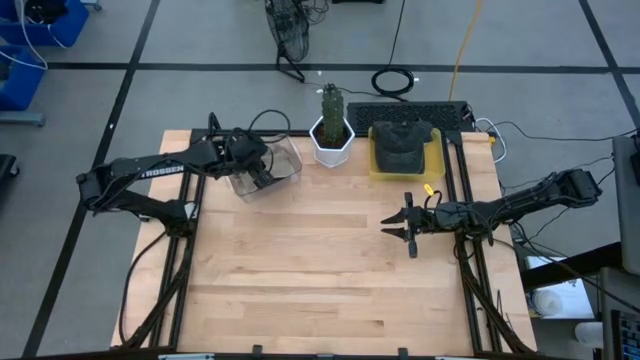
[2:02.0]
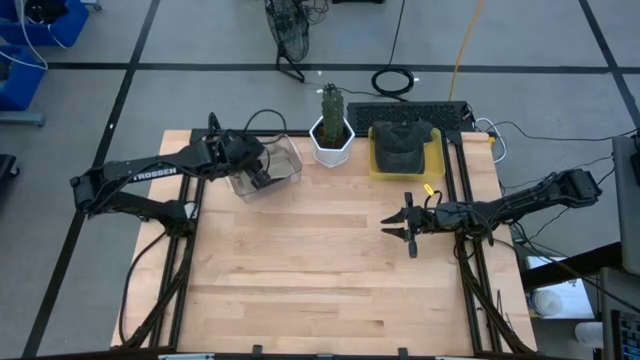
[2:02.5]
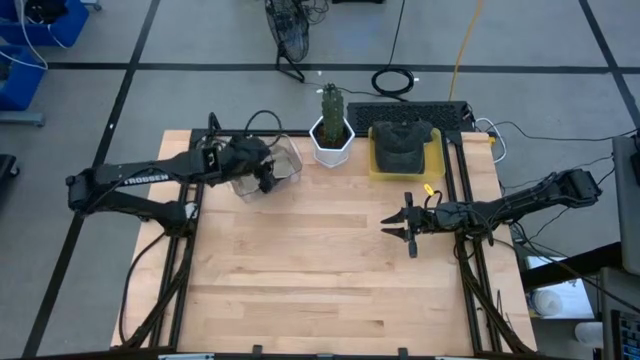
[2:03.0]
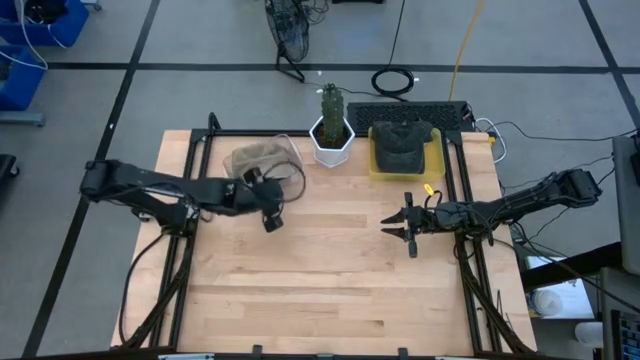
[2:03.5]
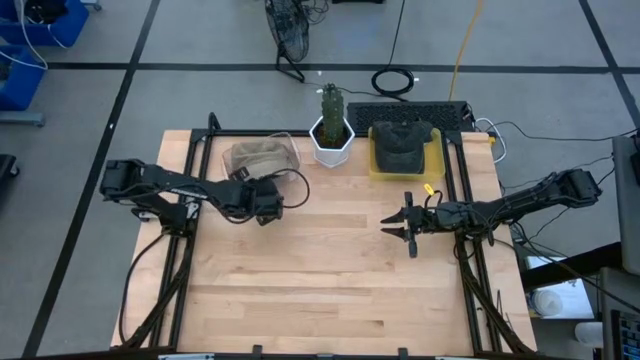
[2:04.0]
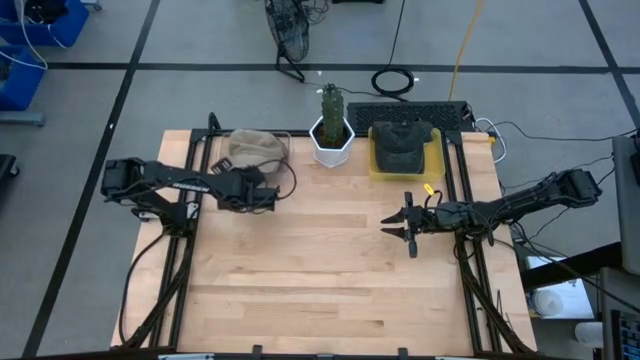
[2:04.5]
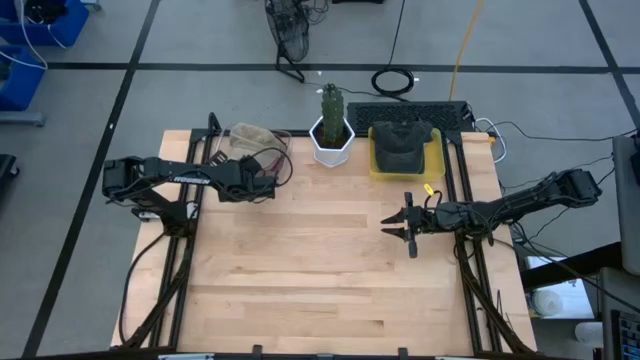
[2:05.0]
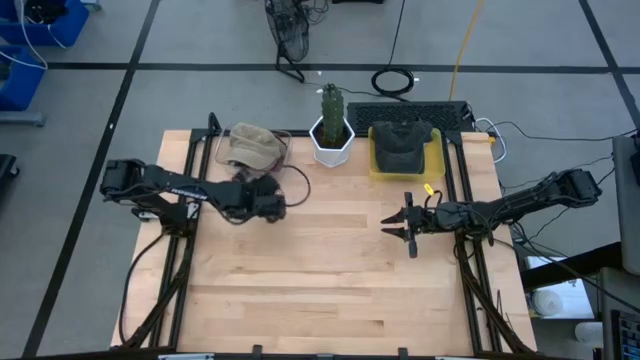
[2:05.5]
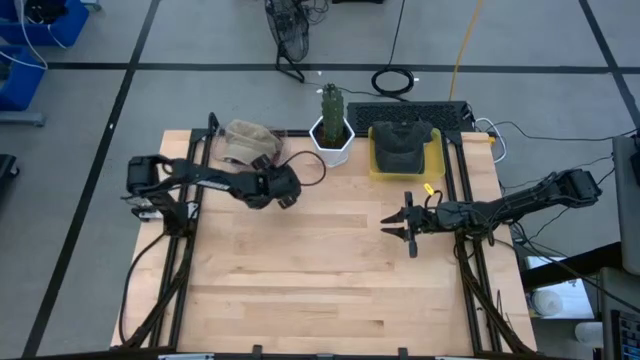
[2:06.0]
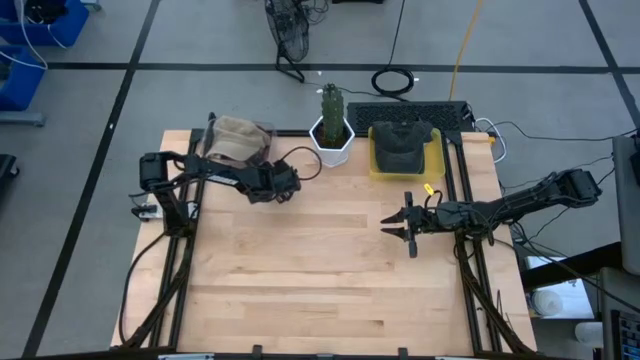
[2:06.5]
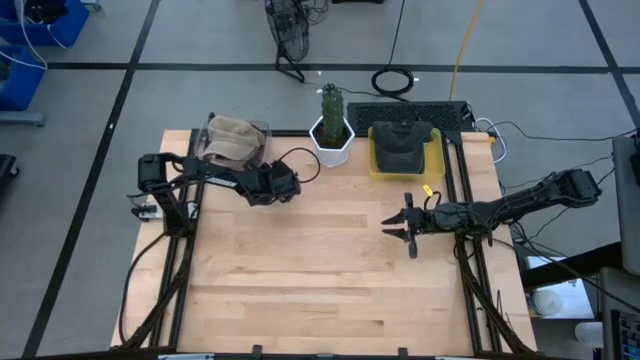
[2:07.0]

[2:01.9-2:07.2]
Task: Pick & Place hat
Adjust the transparent bin

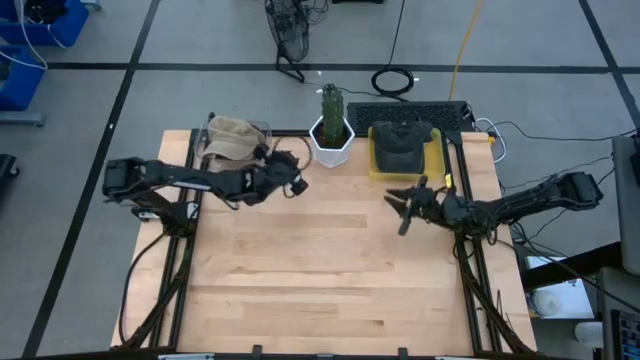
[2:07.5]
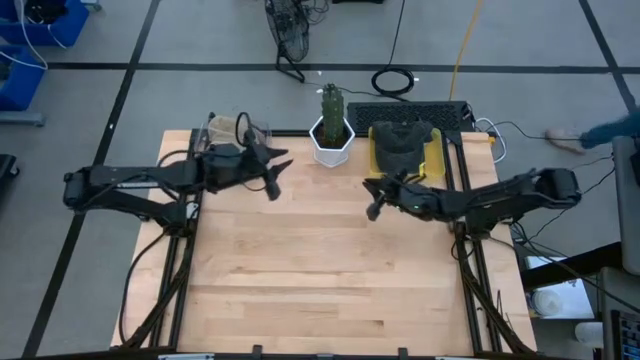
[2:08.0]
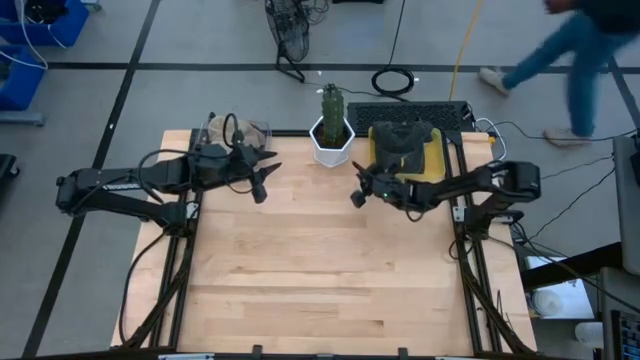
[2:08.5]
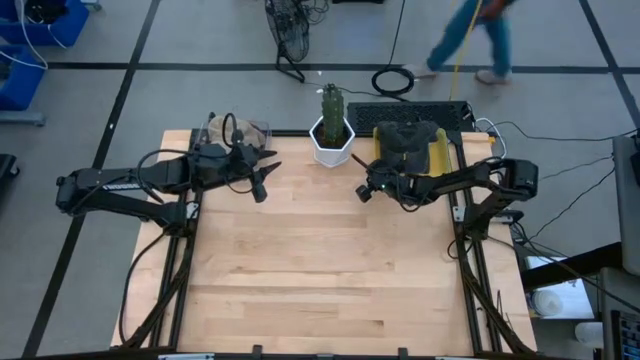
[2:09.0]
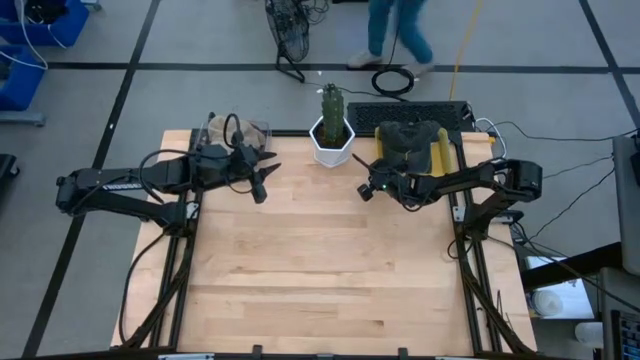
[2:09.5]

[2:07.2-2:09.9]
Adjust the yellow bin

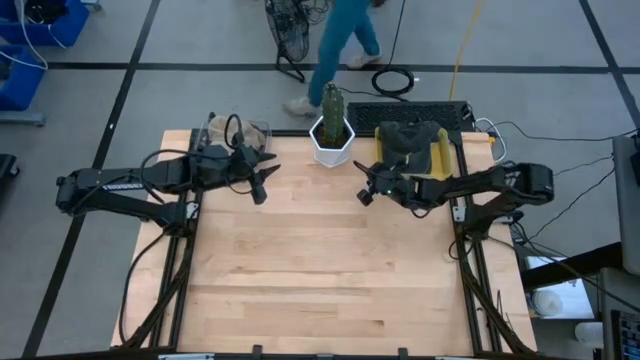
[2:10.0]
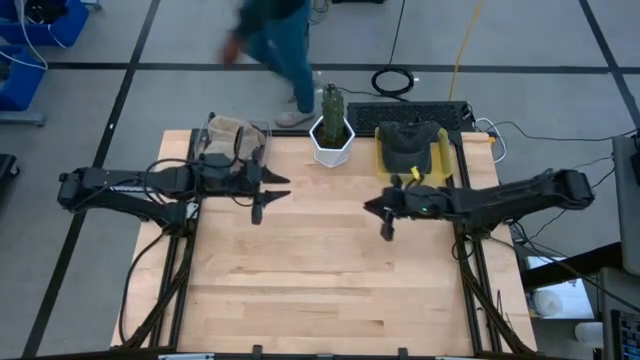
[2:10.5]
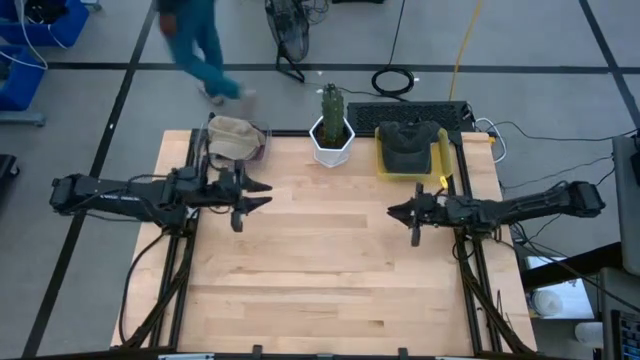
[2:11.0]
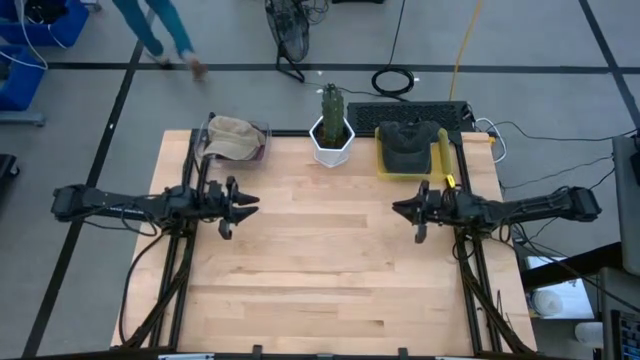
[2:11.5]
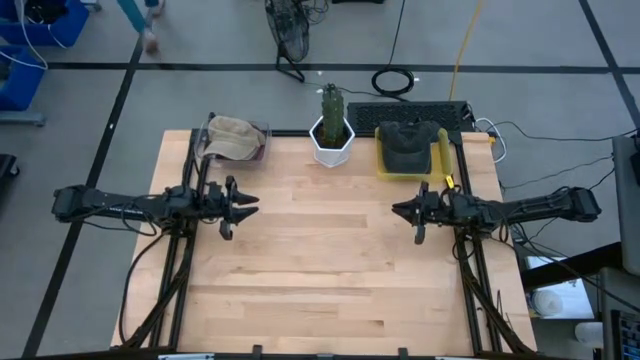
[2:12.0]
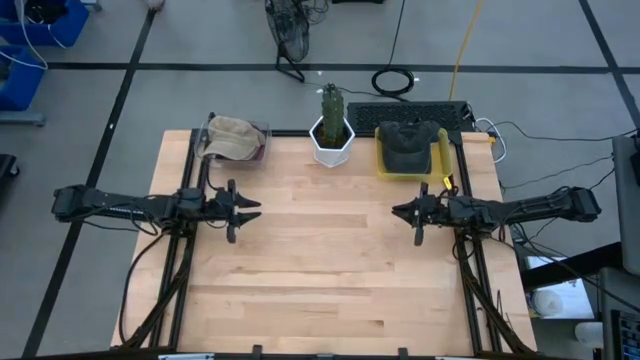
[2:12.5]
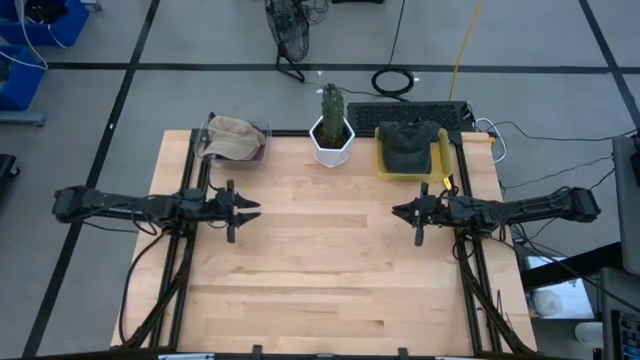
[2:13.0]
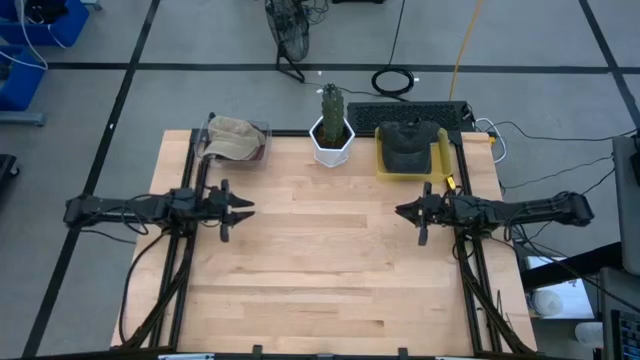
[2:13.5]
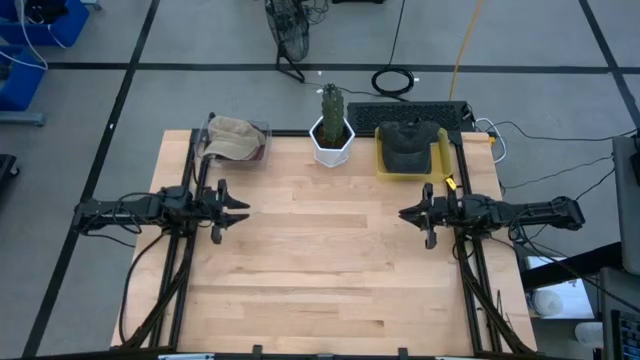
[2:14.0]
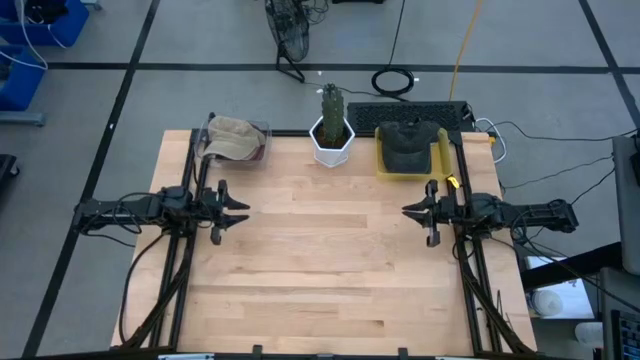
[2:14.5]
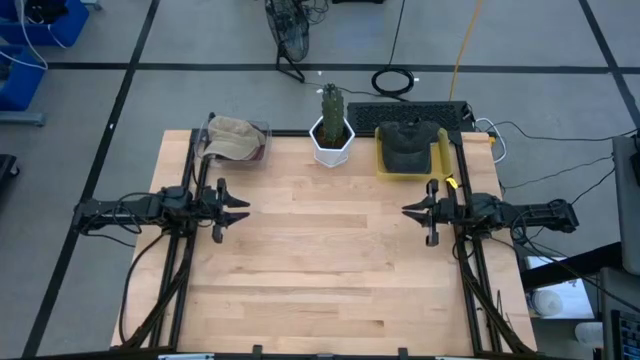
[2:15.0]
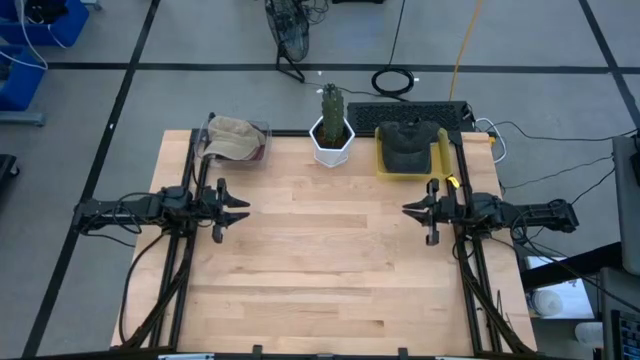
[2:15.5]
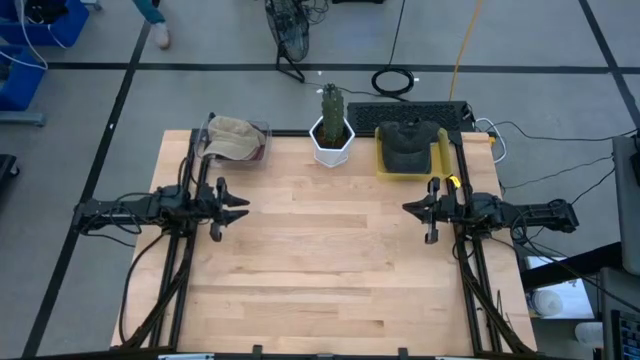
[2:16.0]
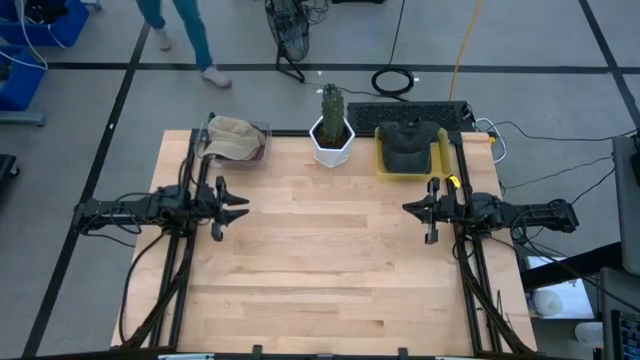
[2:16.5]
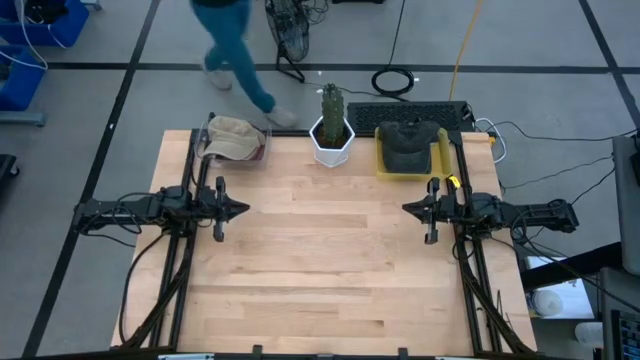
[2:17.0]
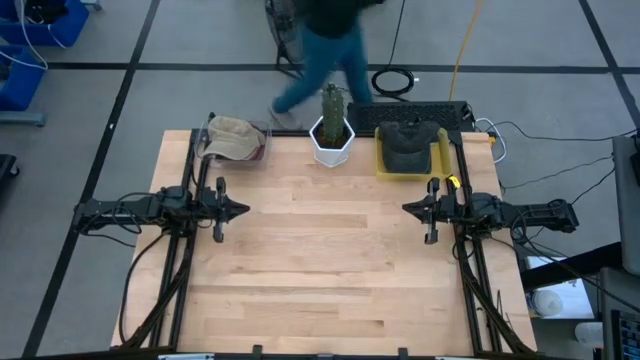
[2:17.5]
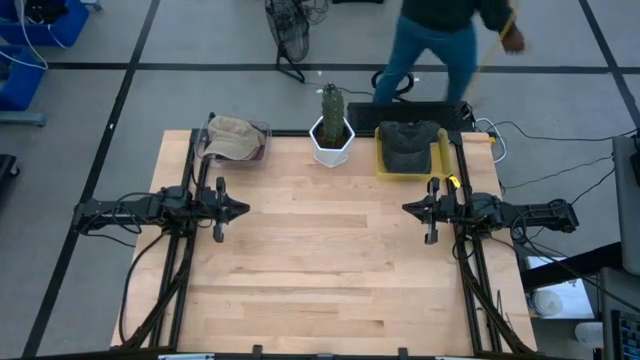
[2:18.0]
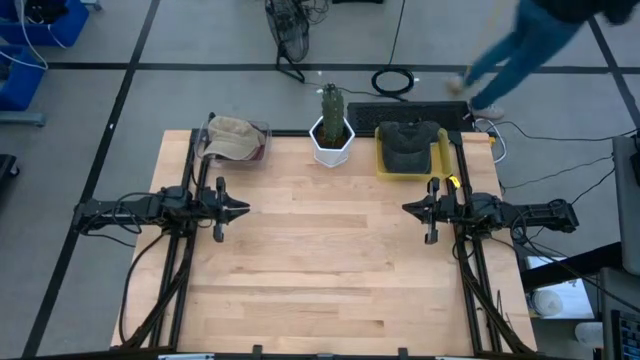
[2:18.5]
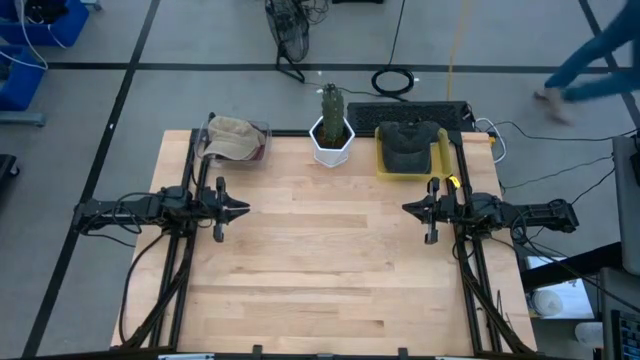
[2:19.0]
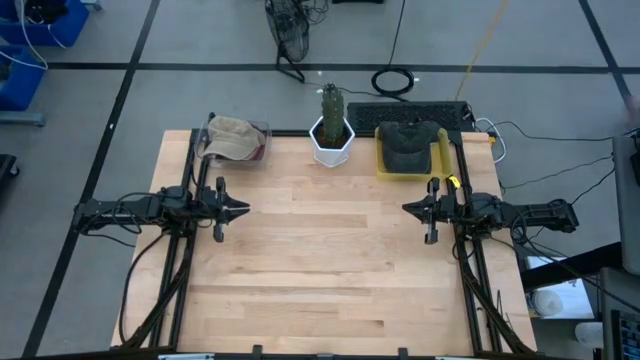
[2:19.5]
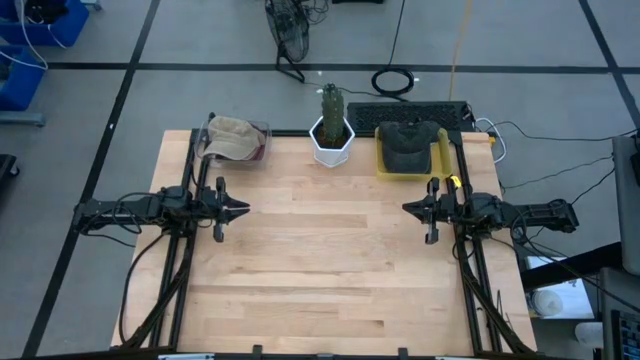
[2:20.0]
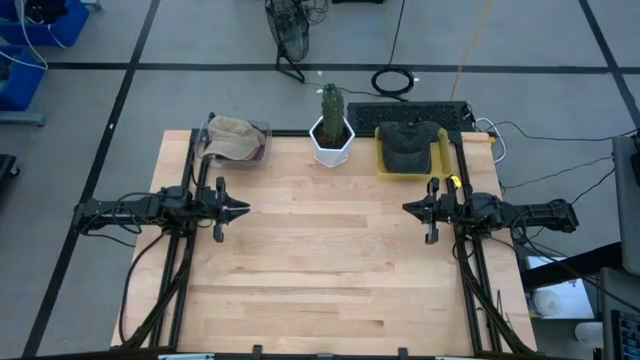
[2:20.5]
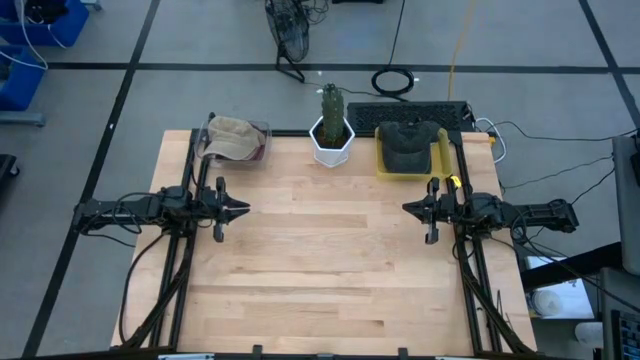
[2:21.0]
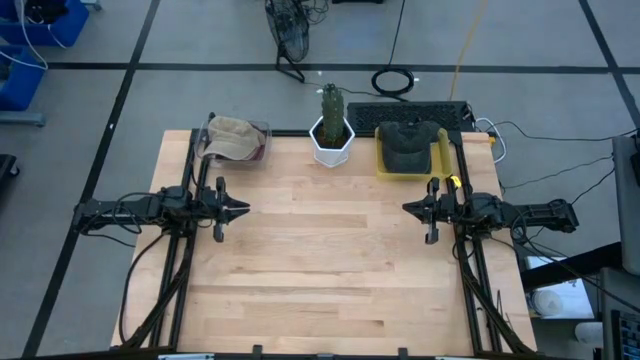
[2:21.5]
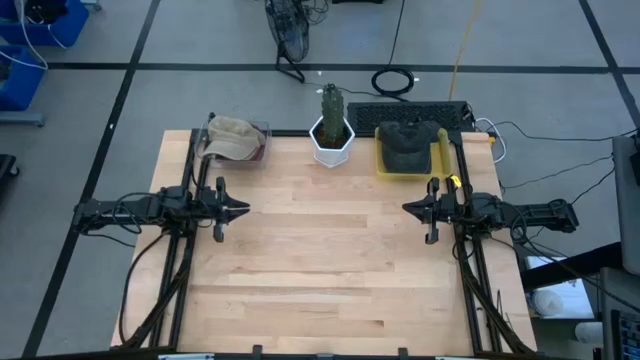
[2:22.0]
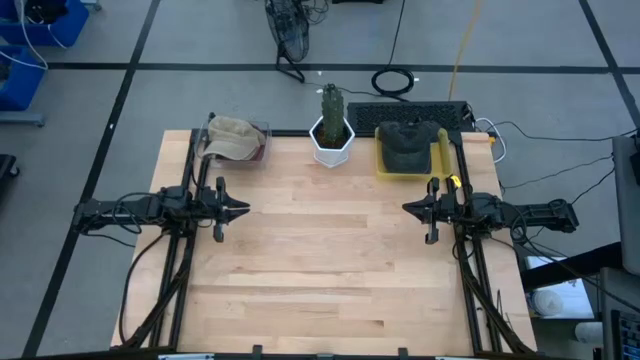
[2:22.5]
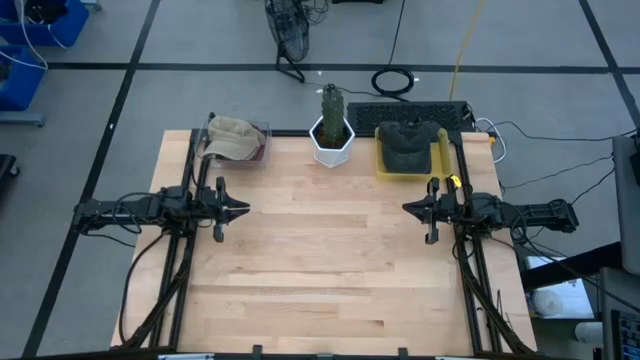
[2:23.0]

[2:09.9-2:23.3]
Return to Home Position
